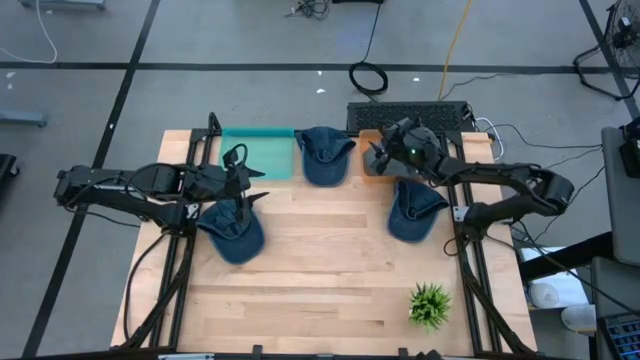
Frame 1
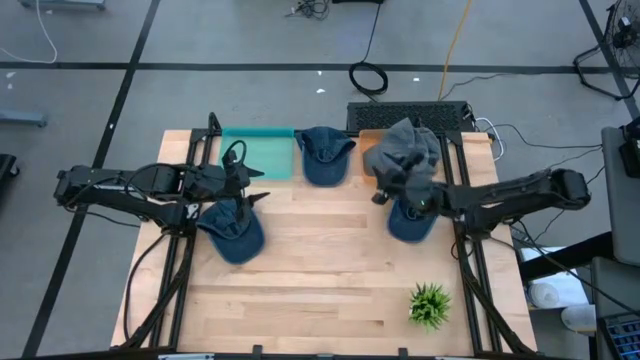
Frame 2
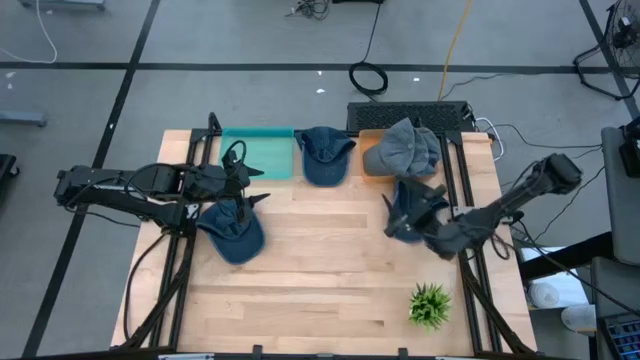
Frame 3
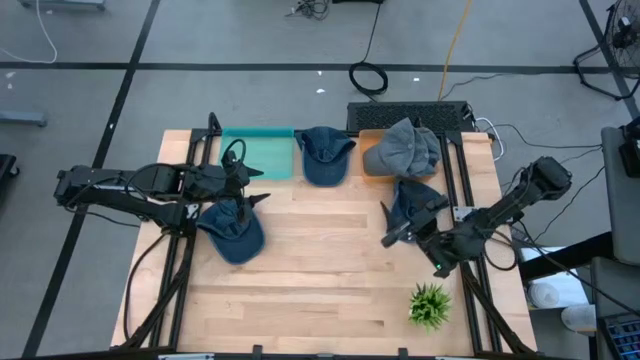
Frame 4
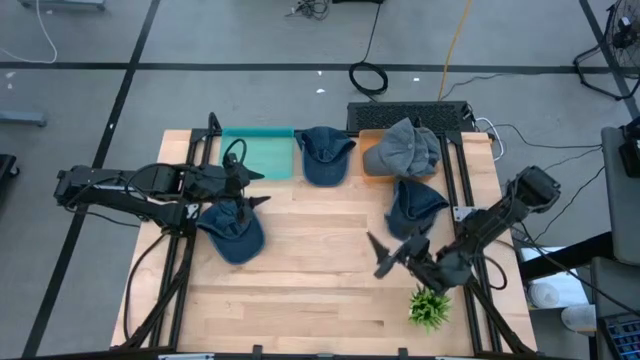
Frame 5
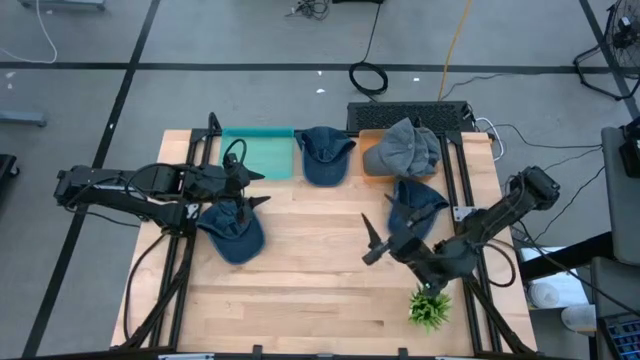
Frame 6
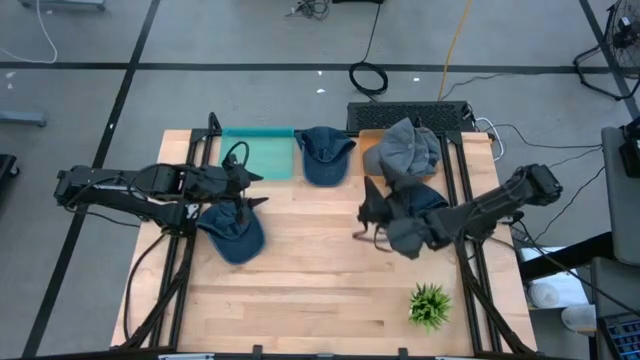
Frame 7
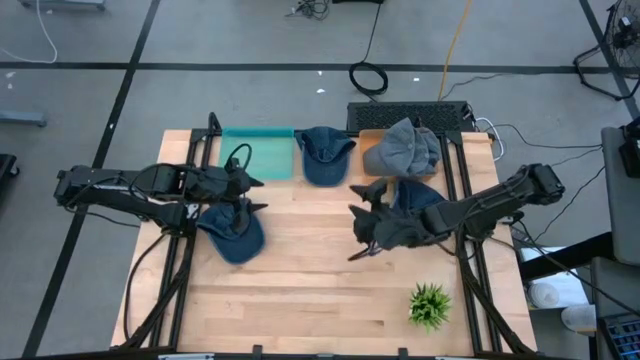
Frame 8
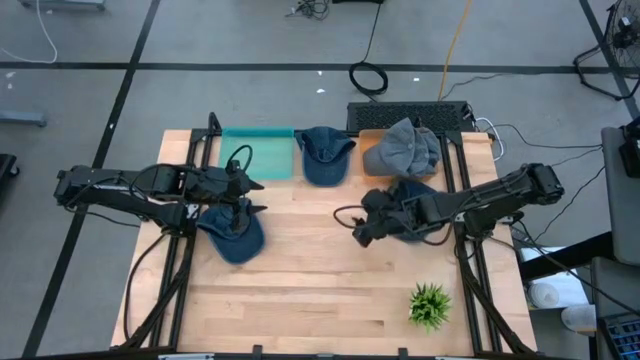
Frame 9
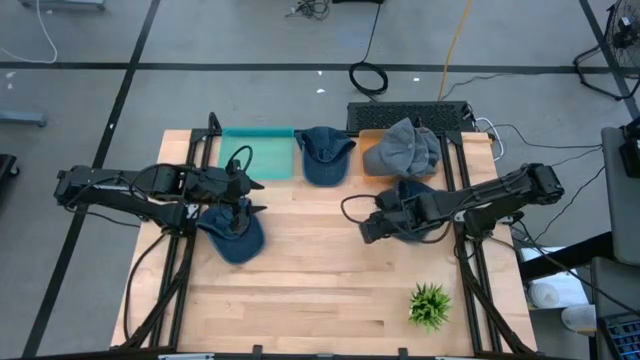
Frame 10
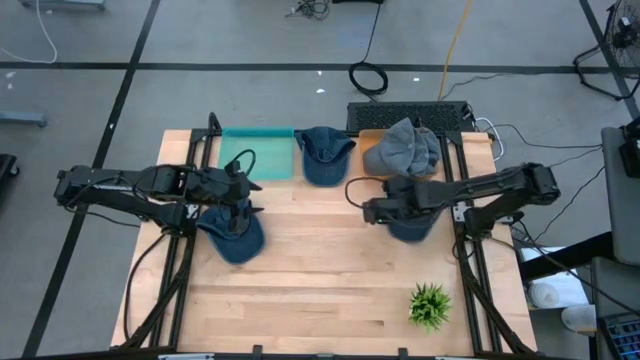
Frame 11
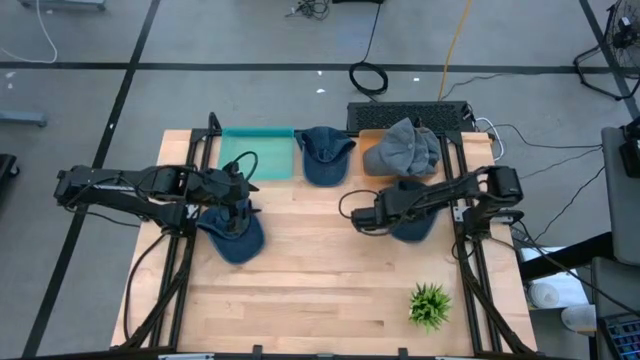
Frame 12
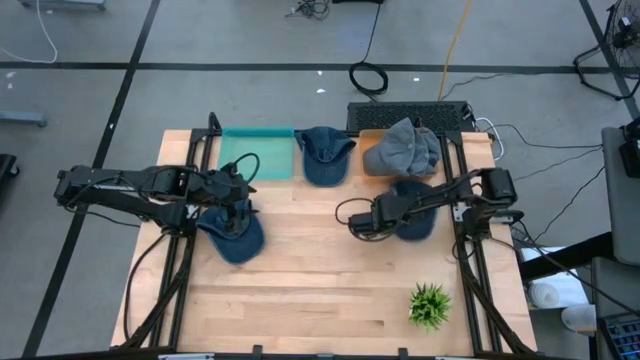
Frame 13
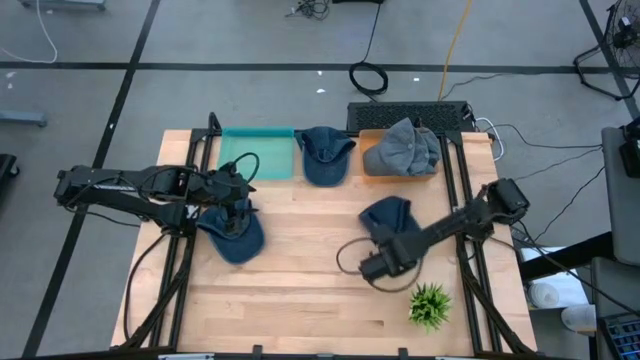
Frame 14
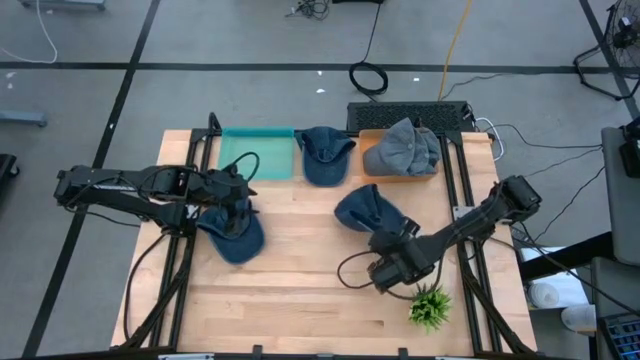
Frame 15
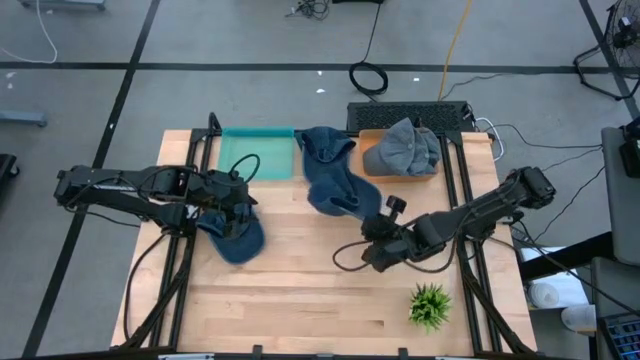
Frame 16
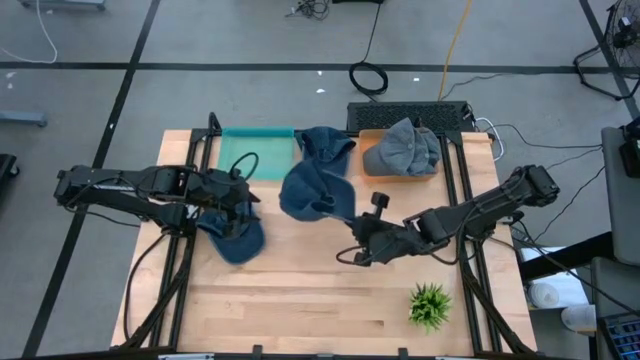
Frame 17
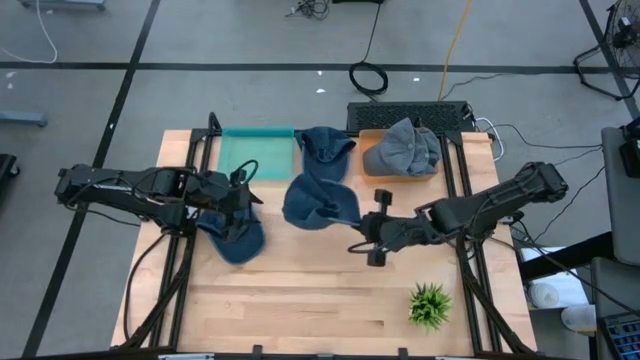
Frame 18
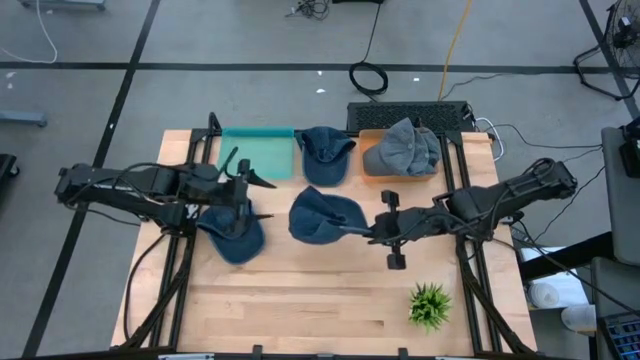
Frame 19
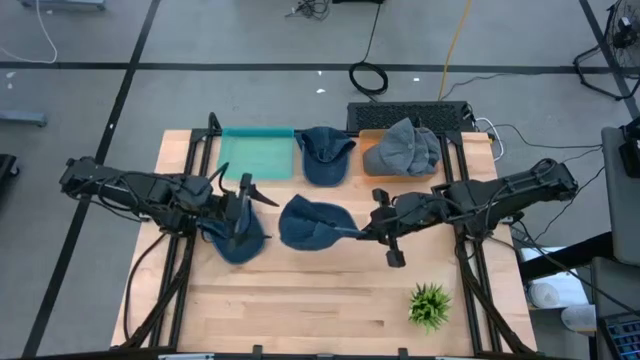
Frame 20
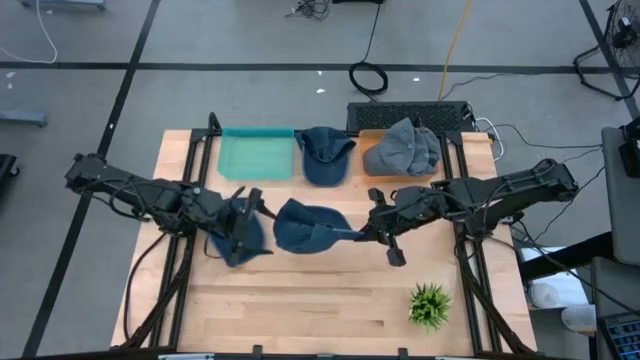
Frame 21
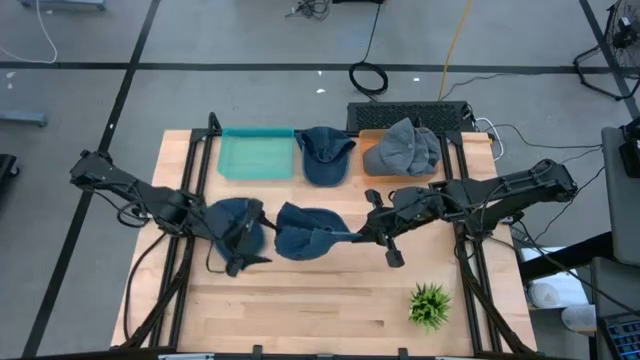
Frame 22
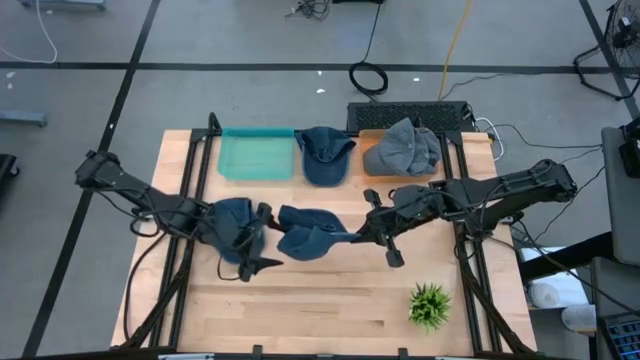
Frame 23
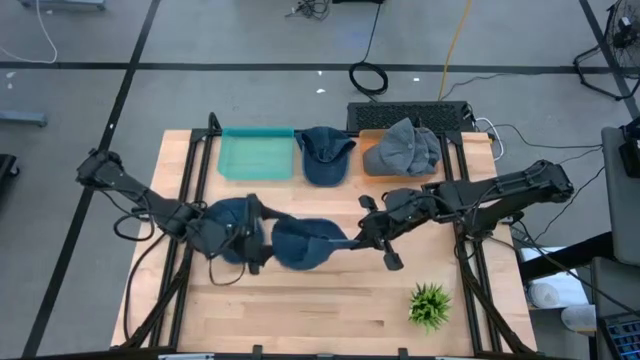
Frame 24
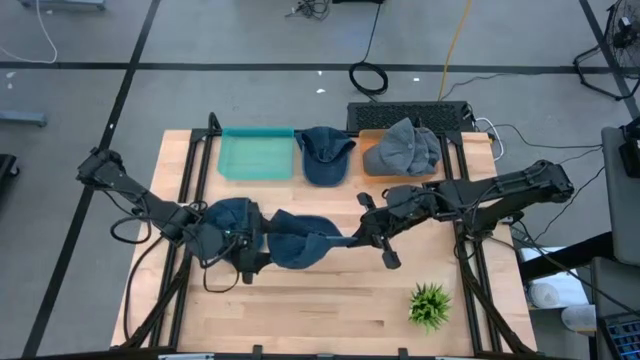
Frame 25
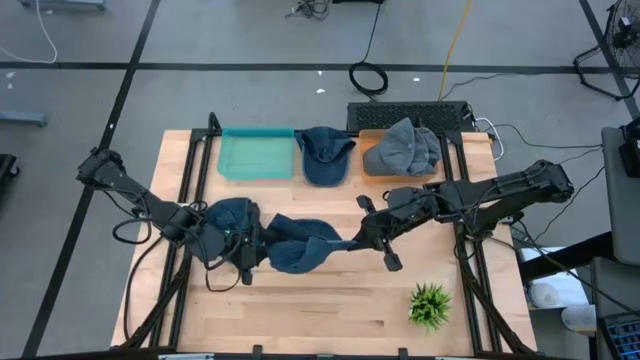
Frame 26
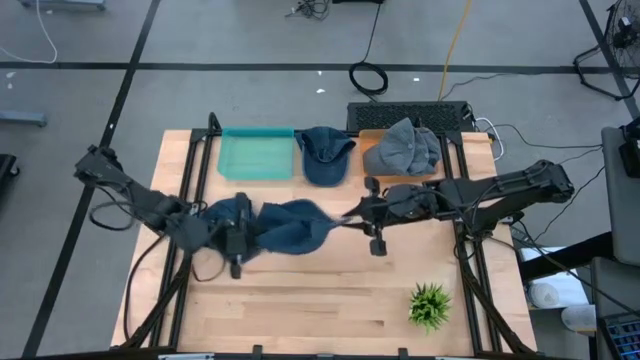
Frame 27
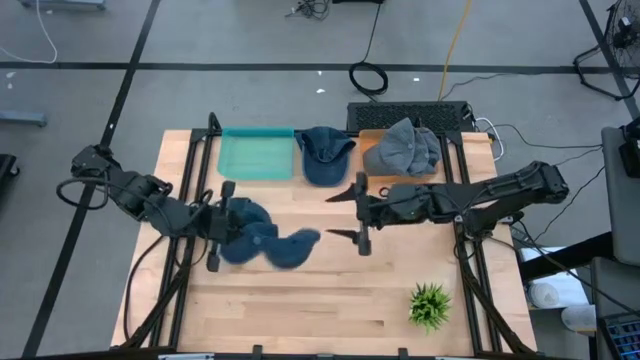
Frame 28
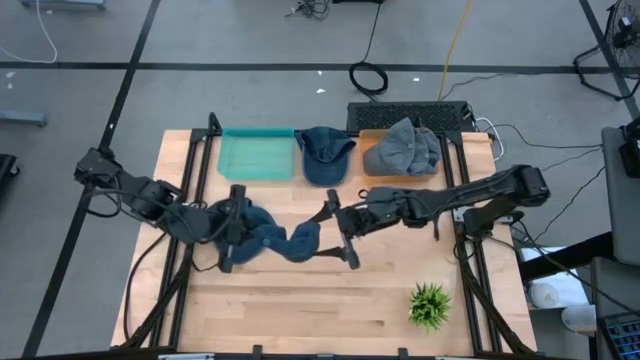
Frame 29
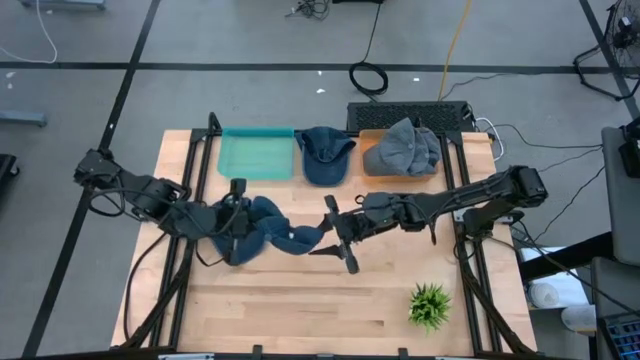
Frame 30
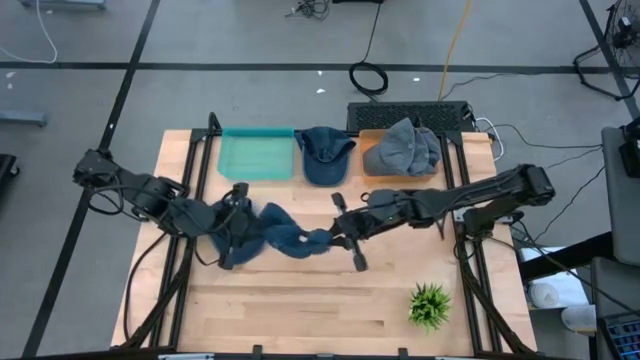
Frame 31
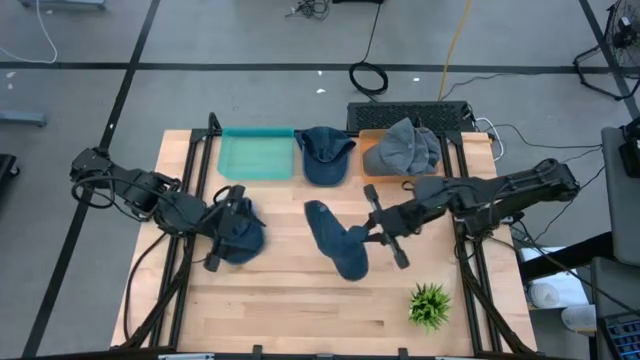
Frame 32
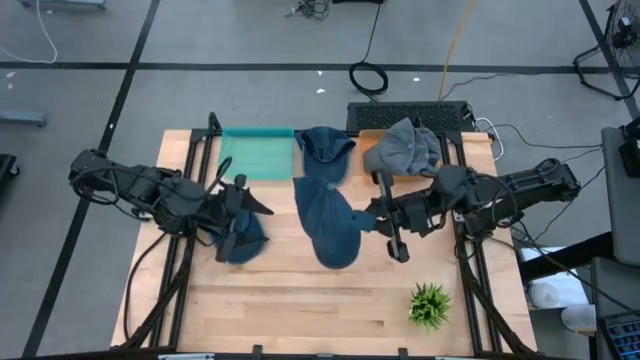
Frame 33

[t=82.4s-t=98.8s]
Task: Pick & Place hat
Put the right dark blue cap into the blue bin

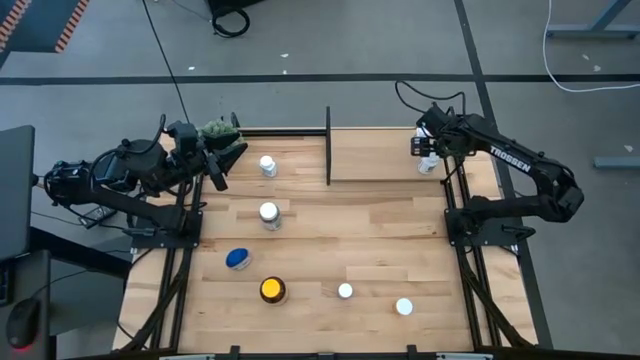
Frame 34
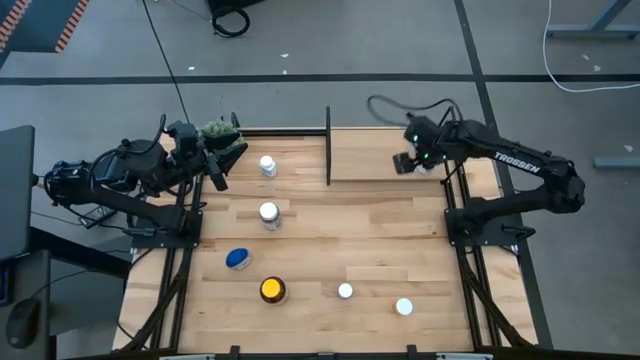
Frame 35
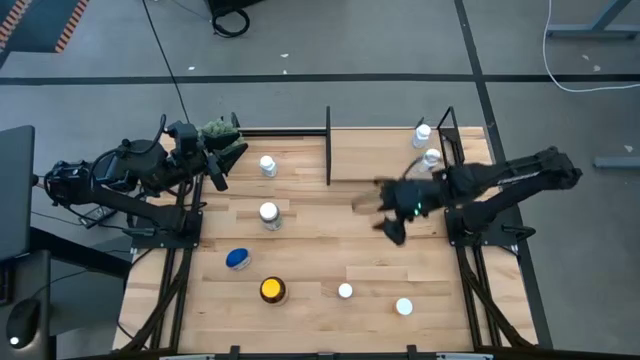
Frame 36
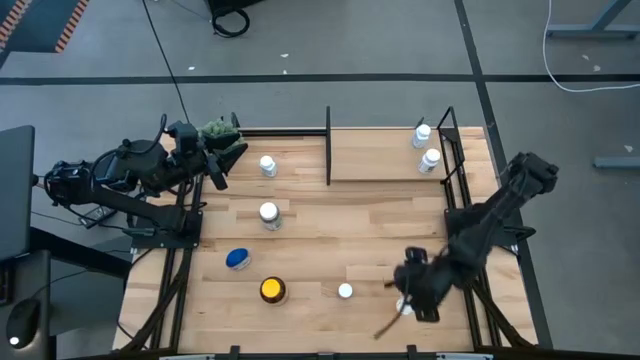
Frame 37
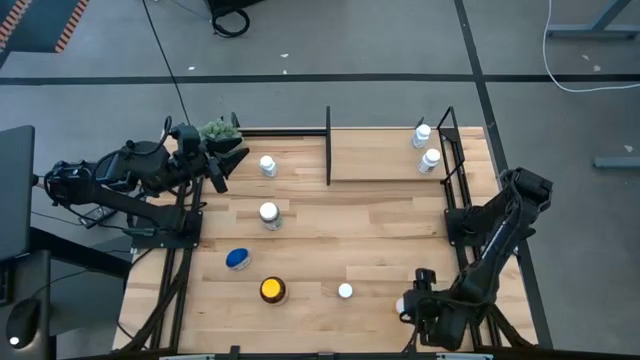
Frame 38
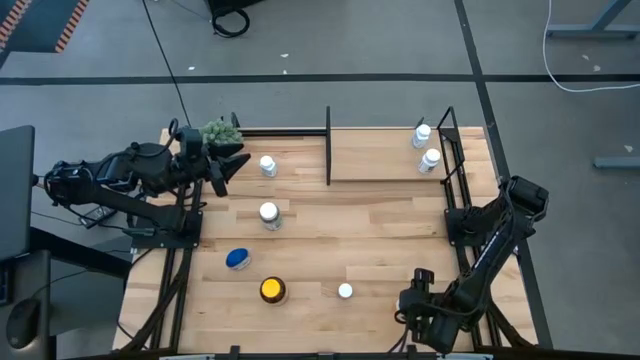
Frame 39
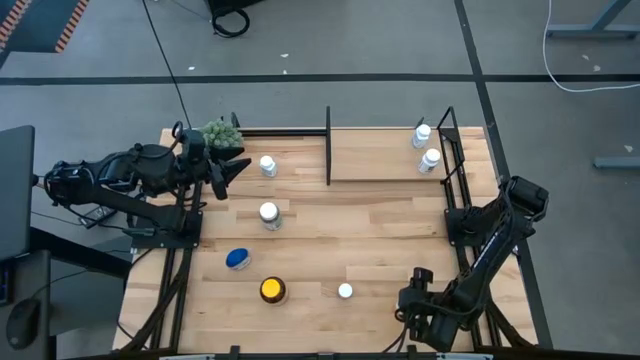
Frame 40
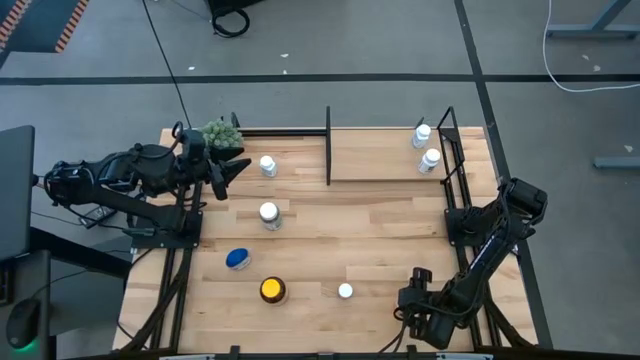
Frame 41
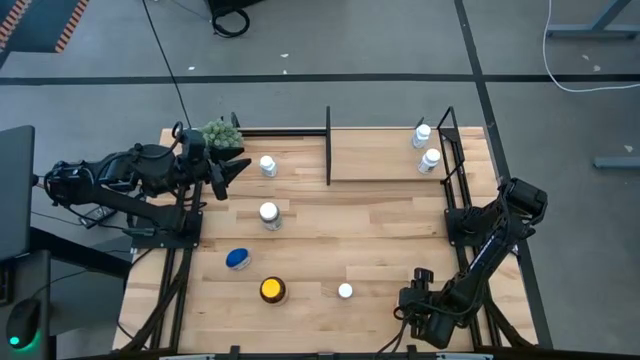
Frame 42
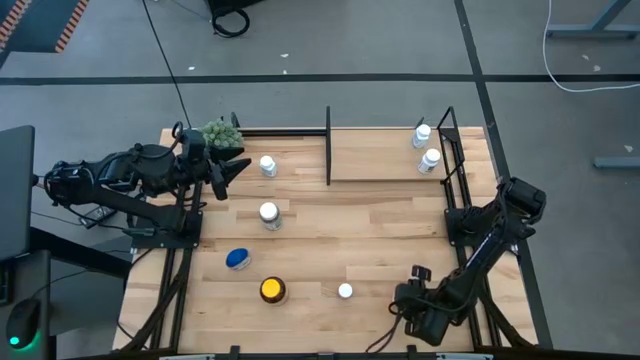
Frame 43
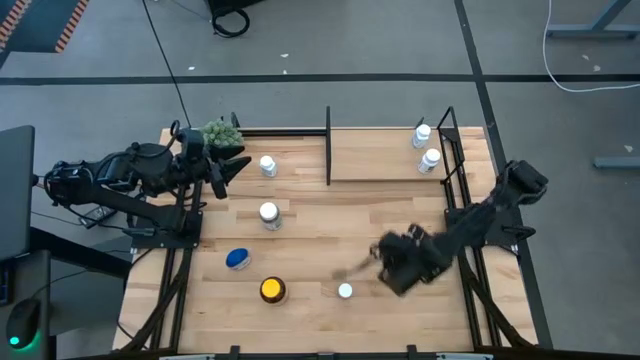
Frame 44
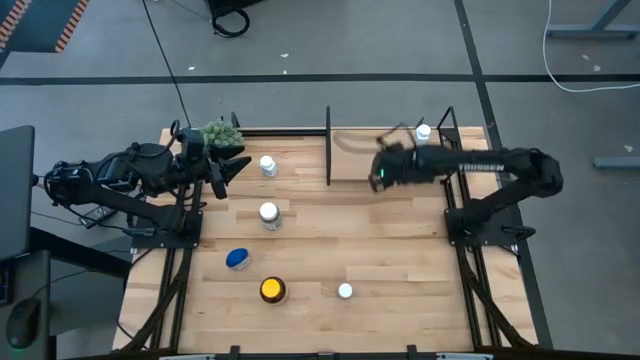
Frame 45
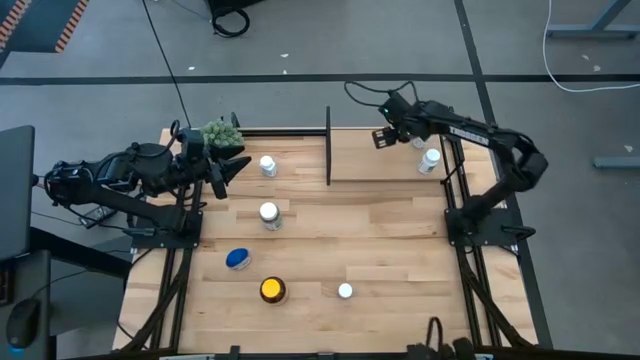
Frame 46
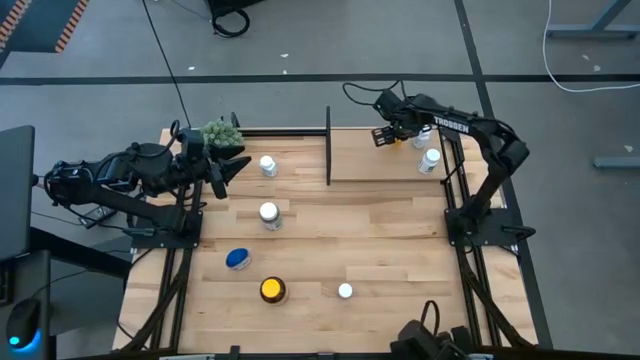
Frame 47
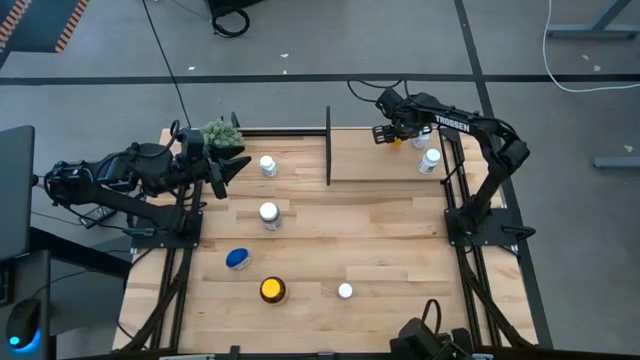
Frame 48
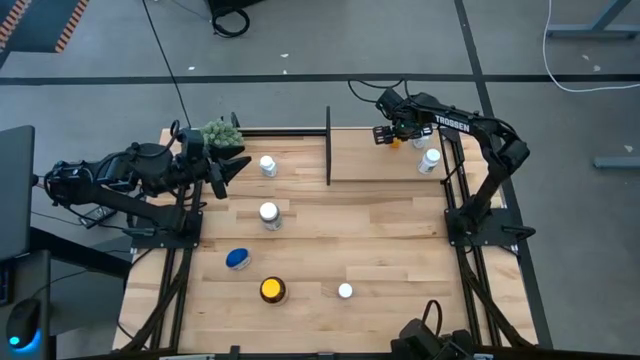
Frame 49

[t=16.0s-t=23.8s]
Task: Pick and place medicine bottles onto shelf by color
Put the orange pill bottle on the shelf
